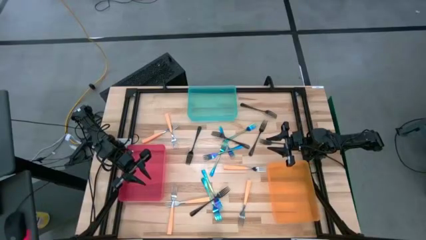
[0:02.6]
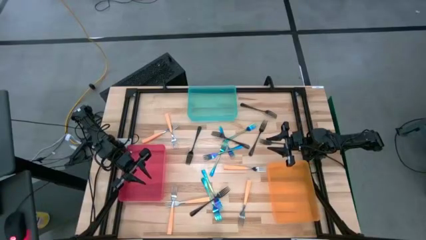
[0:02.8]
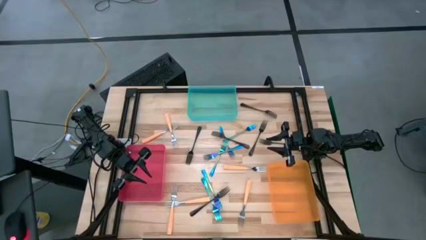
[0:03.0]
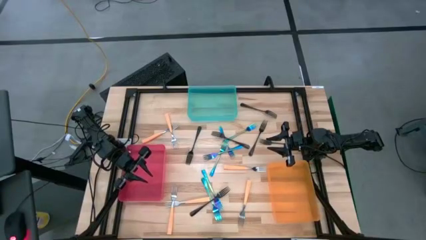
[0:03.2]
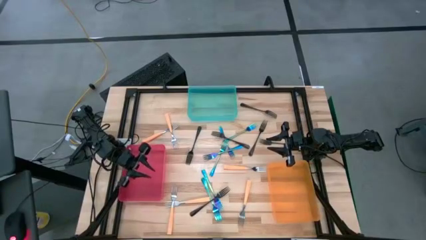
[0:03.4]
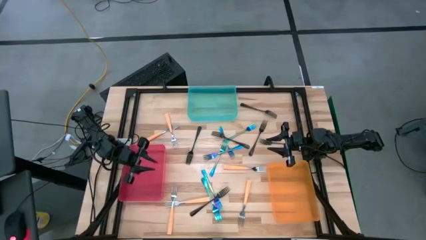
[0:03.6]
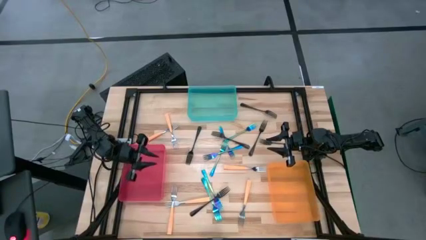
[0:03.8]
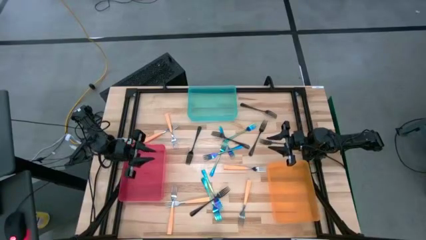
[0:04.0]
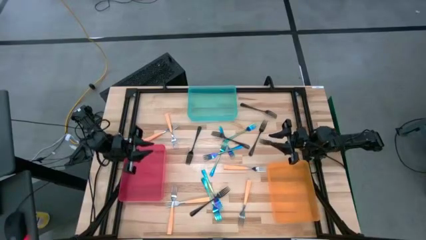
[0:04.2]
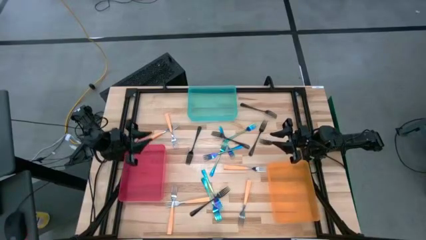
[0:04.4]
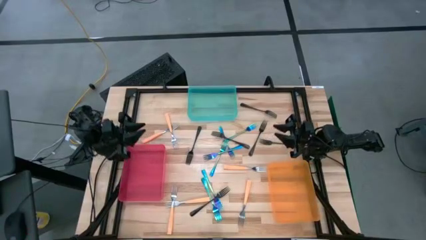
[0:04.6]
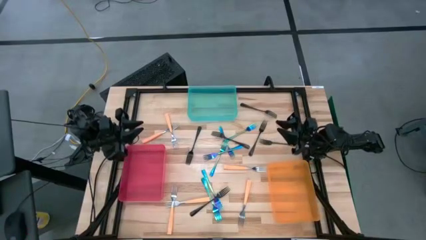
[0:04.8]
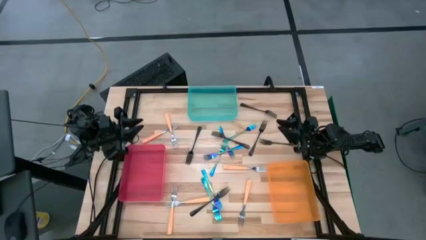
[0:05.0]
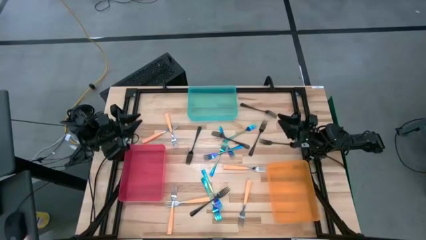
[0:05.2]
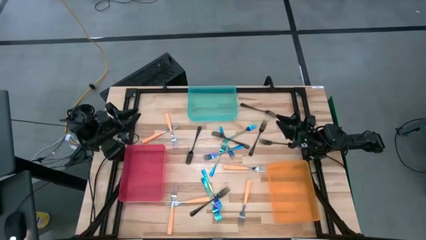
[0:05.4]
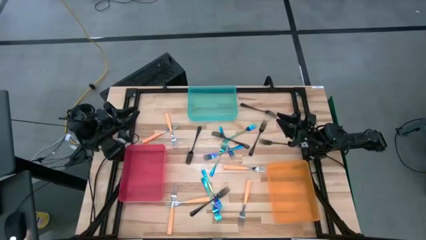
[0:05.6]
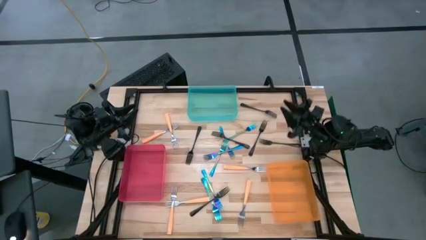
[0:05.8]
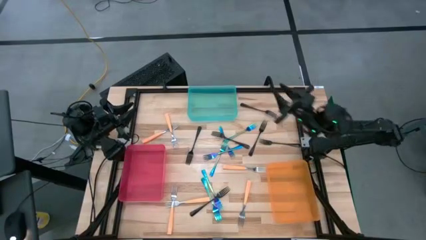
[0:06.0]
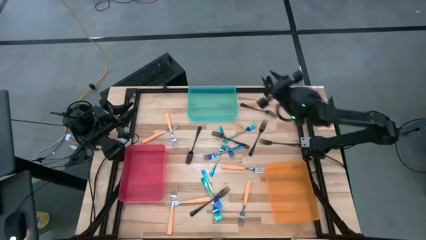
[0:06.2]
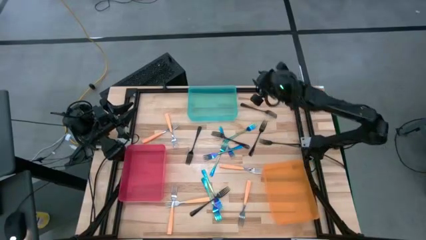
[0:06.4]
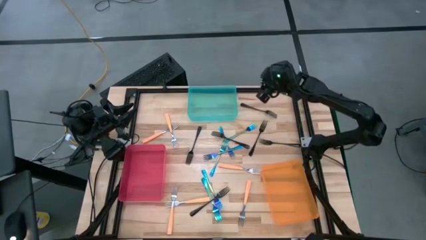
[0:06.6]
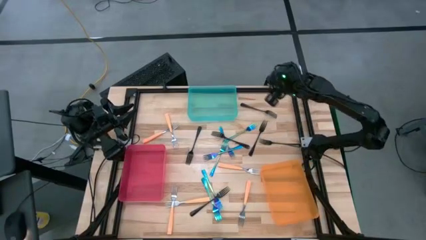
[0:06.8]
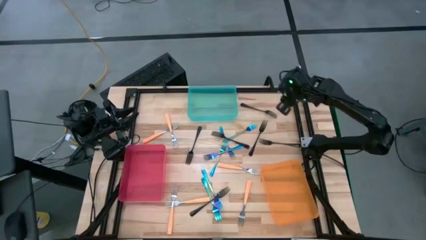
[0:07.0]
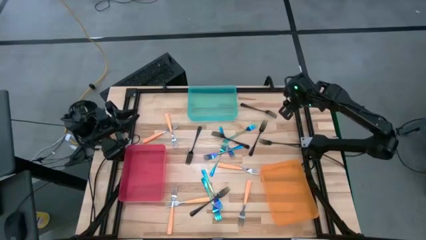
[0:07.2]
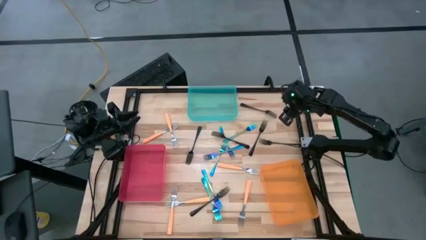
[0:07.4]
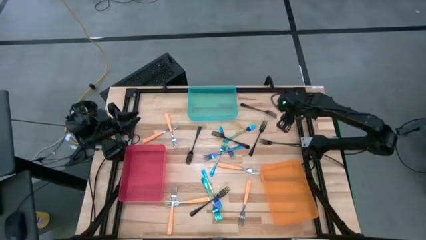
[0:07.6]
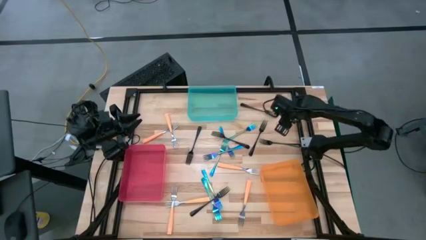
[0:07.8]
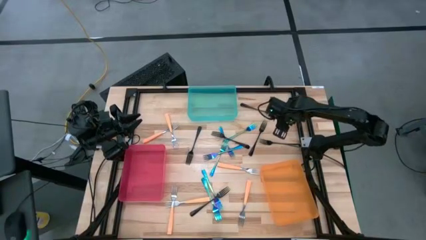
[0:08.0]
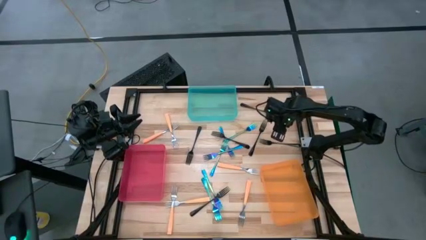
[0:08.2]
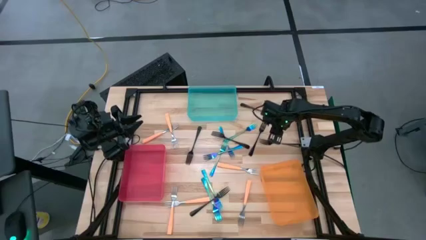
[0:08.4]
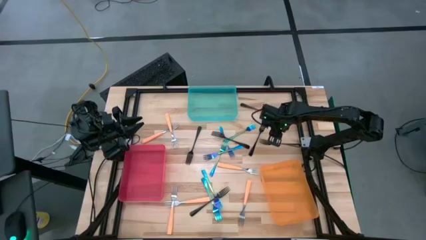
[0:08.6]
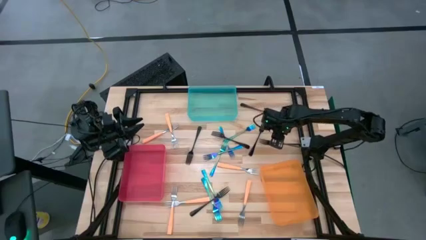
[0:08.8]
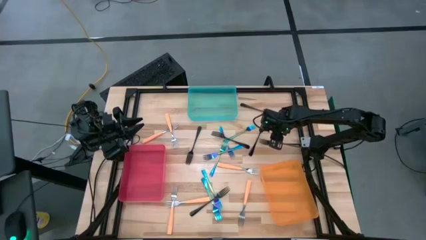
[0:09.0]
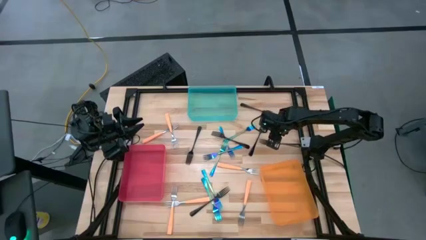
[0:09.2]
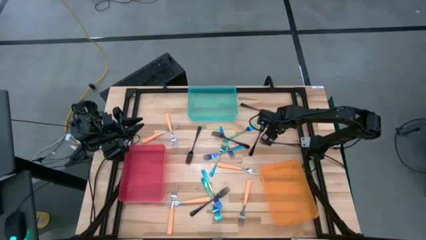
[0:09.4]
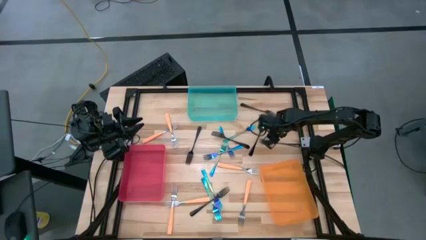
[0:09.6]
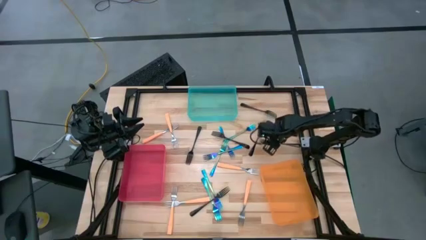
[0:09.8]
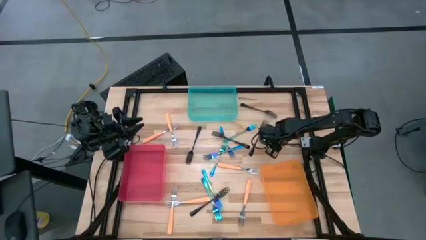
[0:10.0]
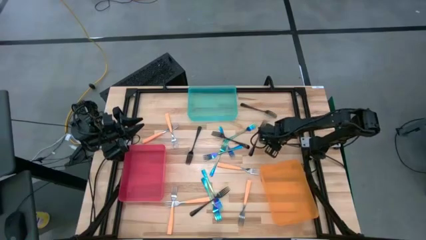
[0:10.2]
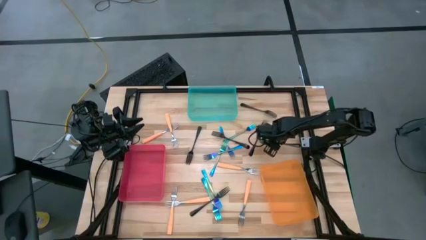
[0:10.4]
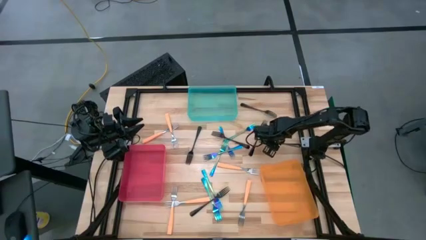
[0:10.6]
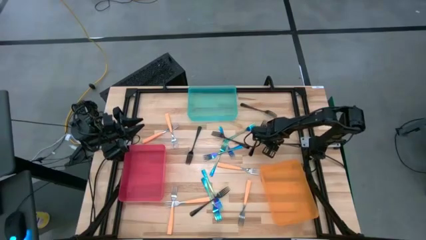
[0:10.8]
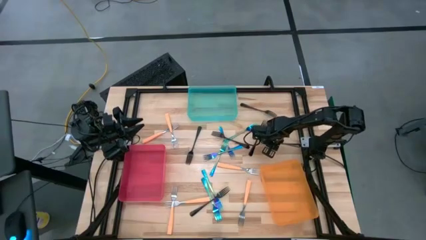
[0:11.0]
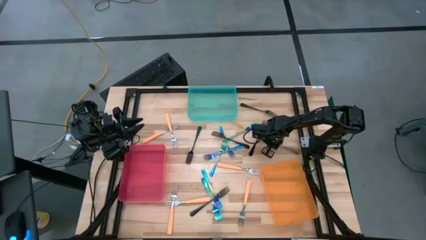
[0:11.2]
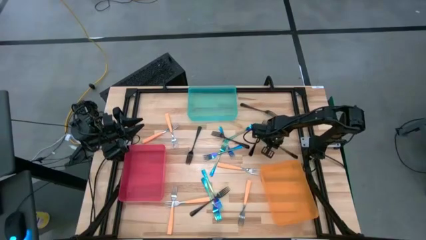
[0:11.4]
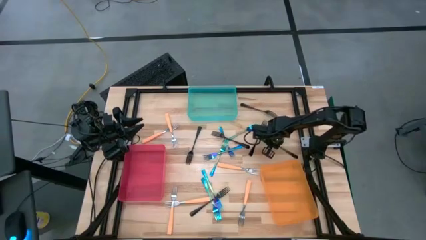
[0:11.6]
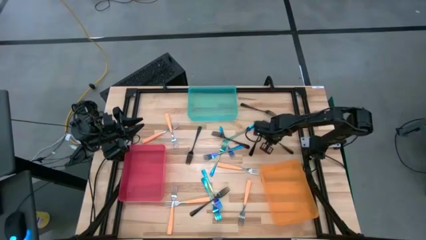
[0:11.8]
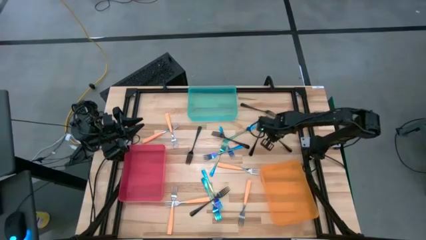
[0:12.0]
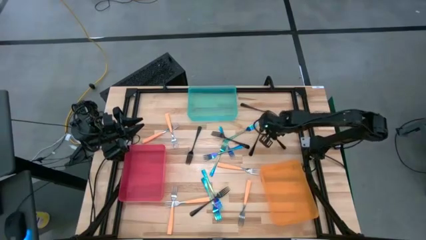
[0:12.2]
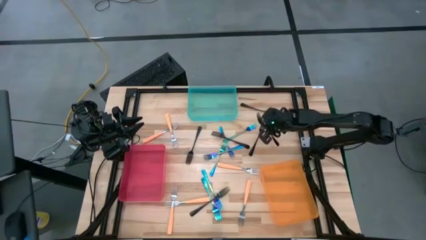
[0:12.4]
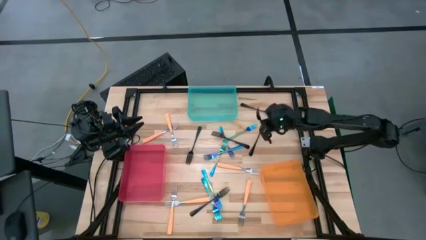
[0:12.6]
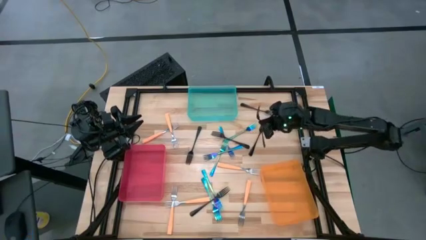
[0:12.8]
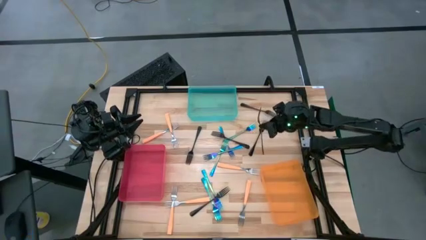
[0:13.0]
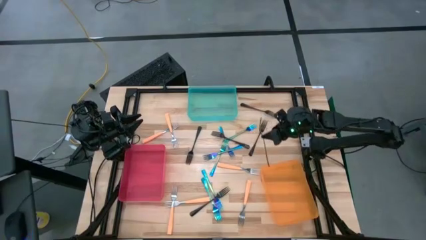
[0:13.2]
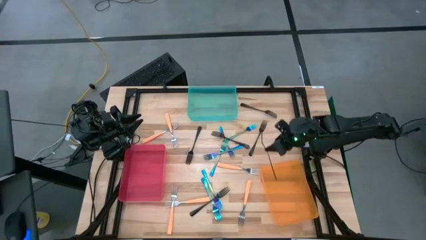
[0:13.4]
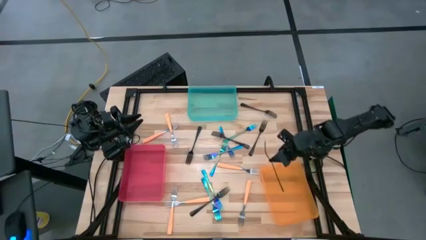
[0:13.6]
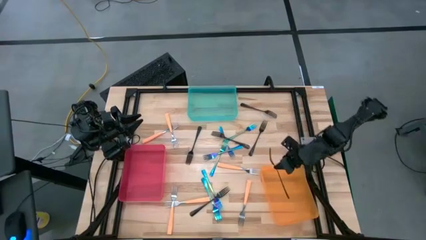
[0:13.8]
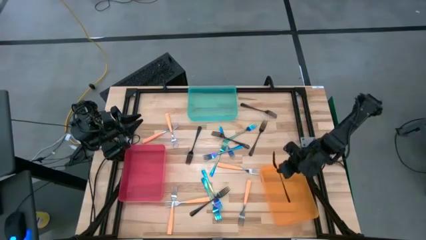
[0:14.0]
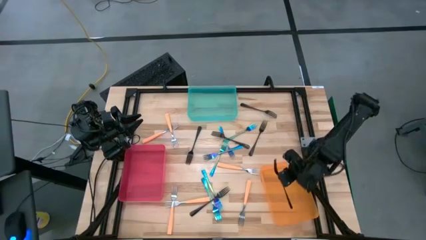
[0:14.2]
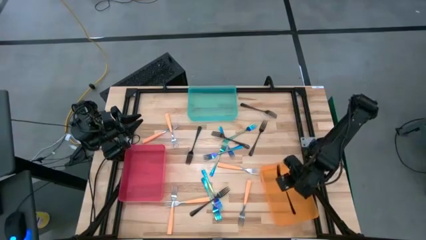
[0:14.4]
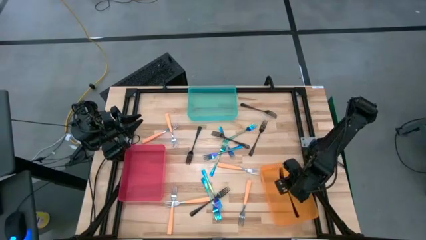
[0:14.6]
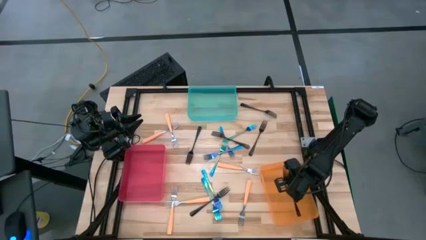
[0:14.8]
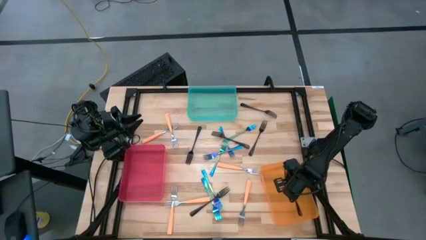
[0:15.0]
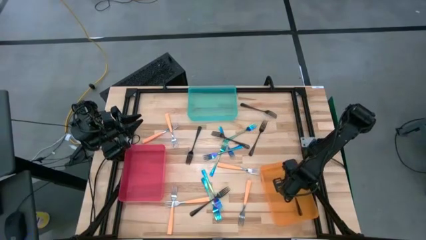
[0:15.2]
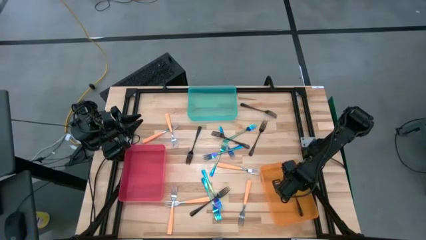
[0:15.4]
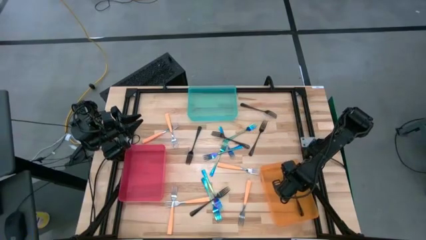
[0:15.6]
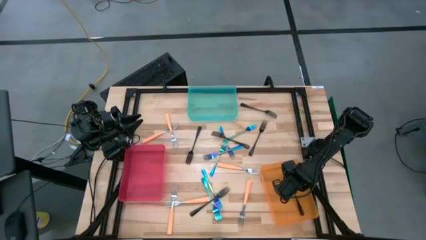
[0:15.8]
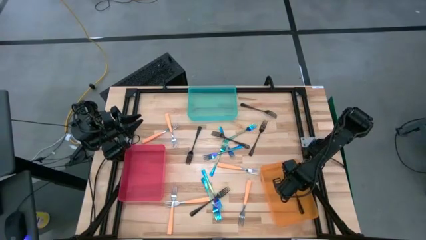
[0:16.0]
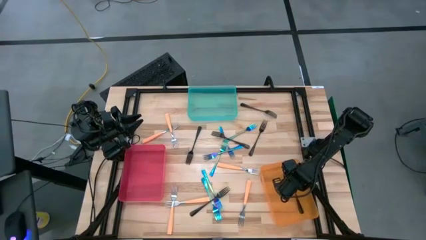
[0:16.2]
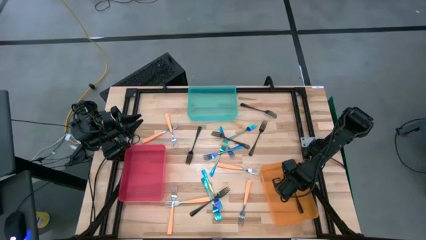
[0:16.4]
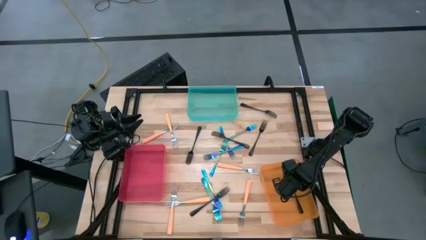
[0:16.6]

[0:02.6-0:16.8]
Task: Sort silverware by color (type)
Put the black fork into the orange bin
